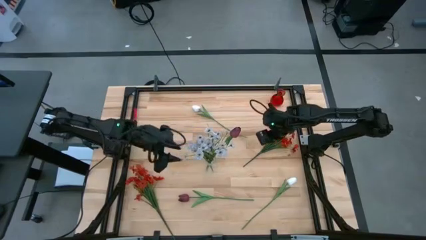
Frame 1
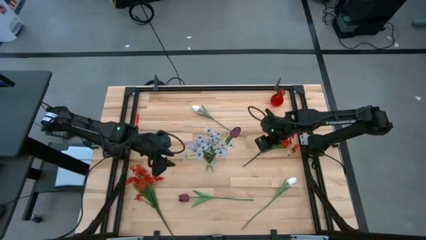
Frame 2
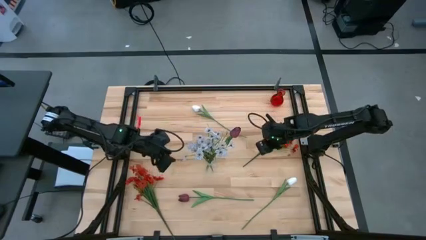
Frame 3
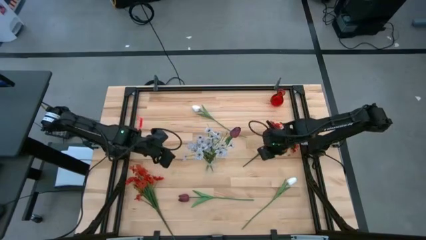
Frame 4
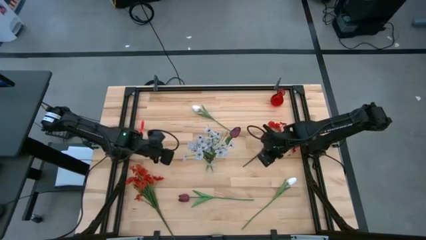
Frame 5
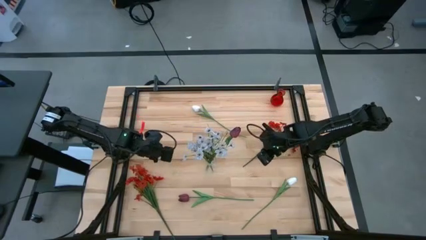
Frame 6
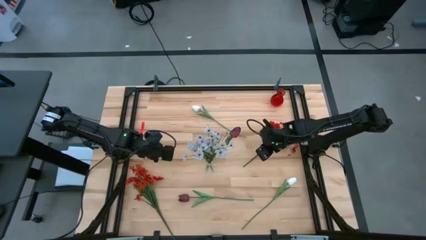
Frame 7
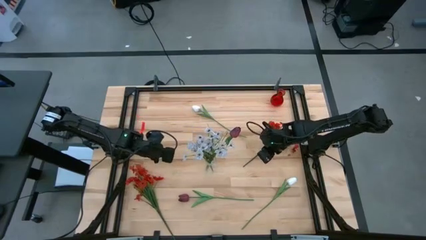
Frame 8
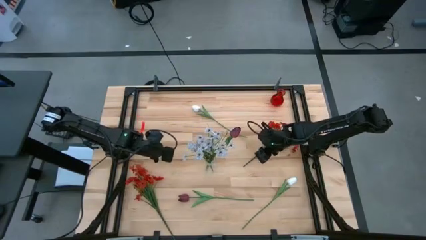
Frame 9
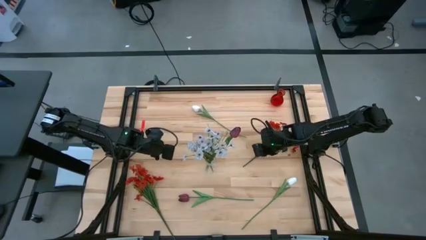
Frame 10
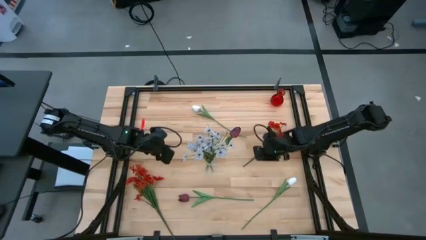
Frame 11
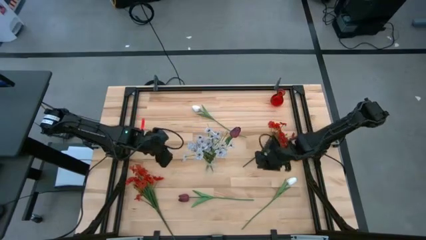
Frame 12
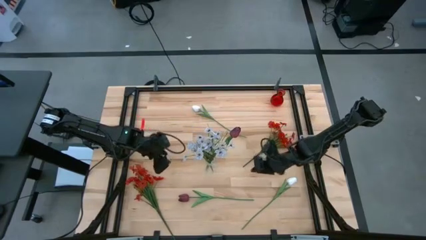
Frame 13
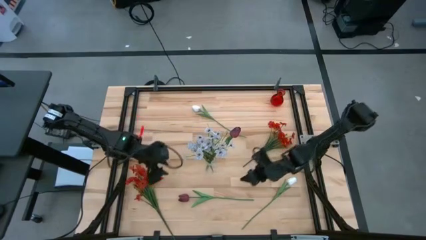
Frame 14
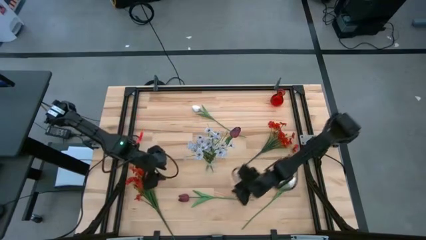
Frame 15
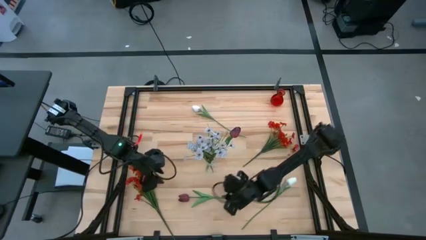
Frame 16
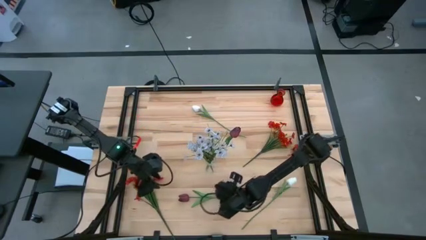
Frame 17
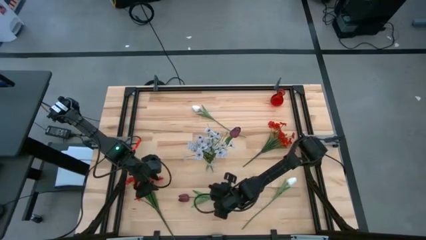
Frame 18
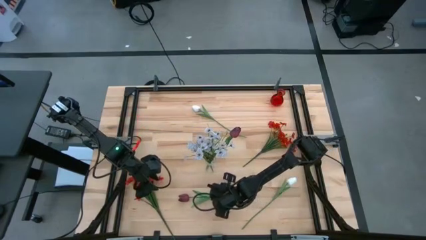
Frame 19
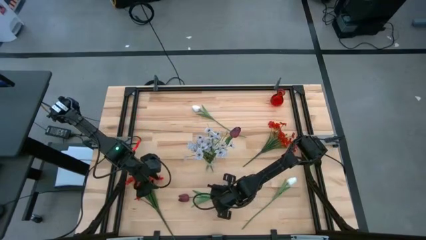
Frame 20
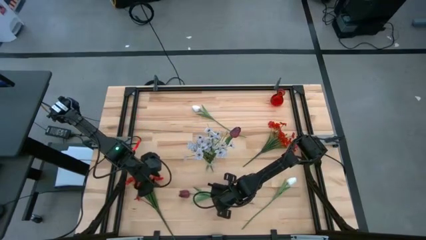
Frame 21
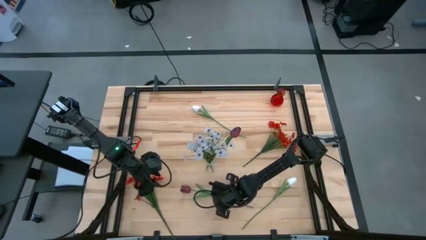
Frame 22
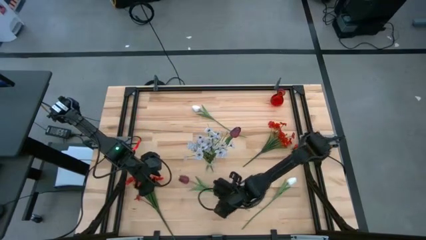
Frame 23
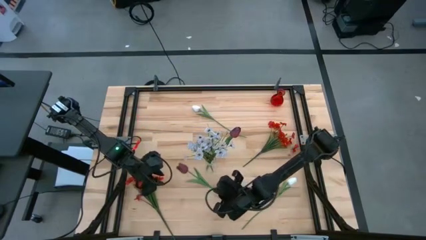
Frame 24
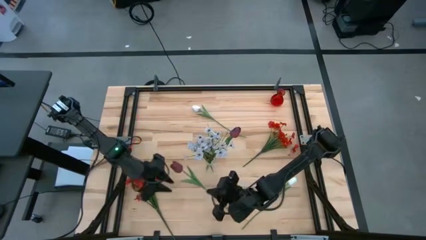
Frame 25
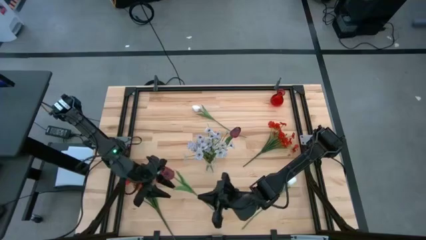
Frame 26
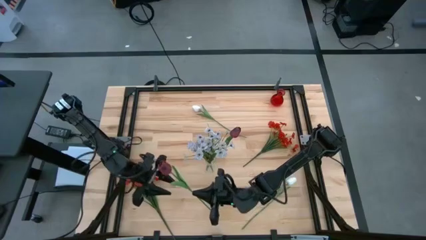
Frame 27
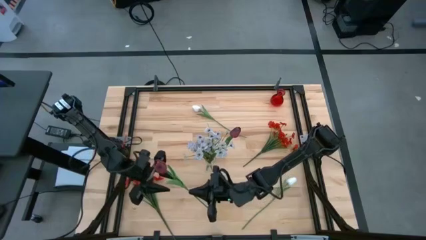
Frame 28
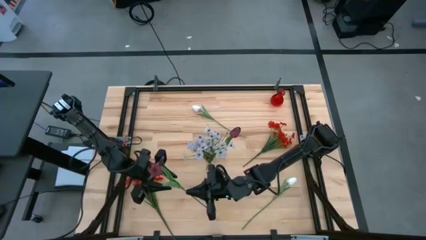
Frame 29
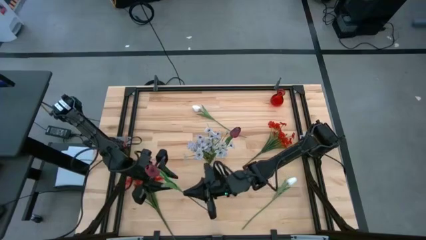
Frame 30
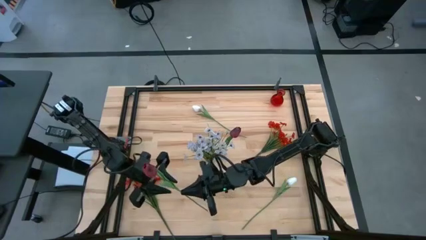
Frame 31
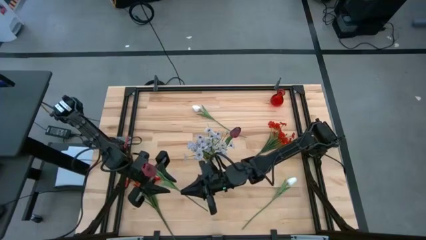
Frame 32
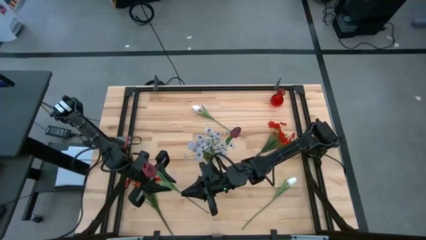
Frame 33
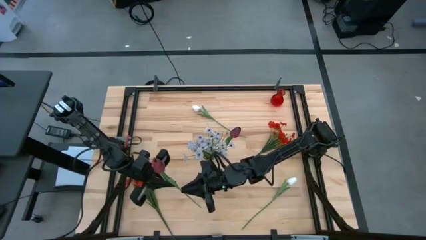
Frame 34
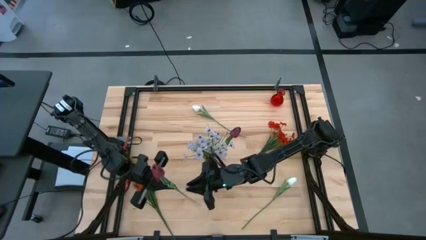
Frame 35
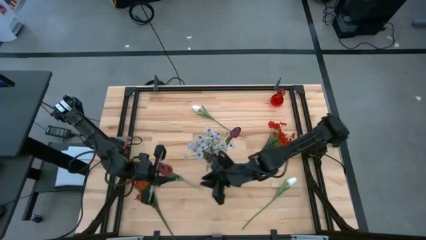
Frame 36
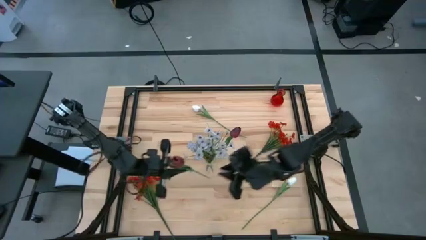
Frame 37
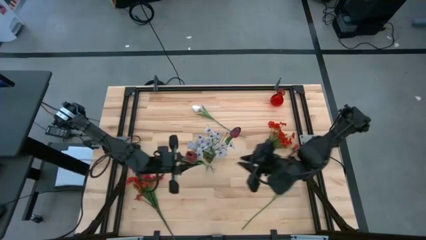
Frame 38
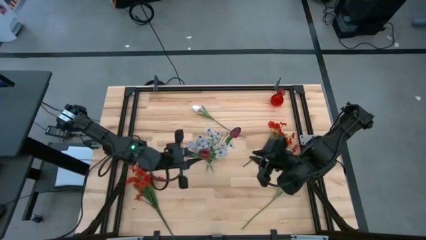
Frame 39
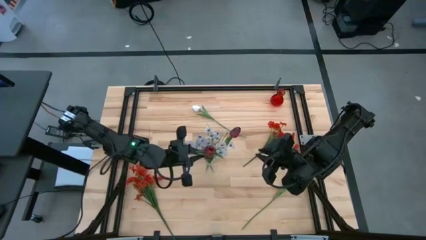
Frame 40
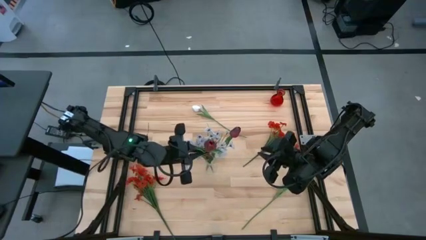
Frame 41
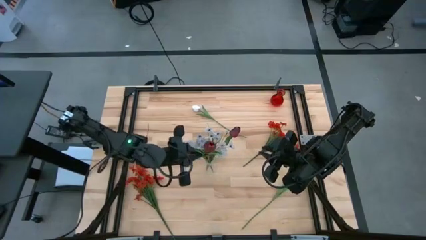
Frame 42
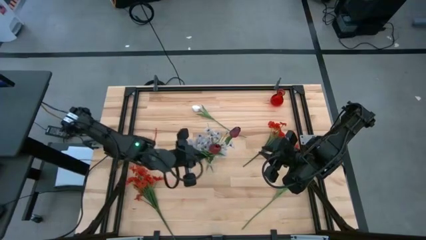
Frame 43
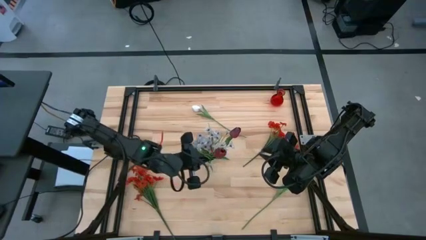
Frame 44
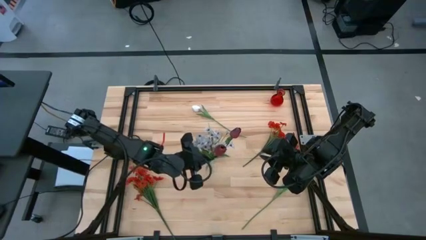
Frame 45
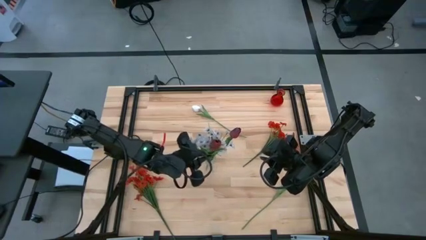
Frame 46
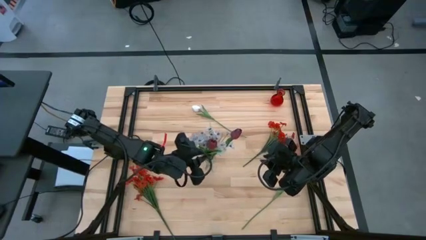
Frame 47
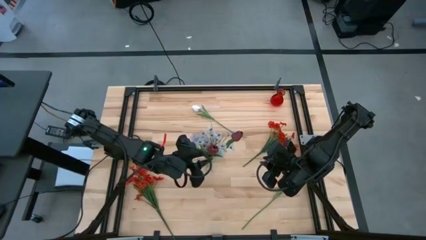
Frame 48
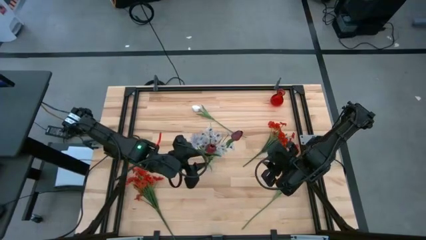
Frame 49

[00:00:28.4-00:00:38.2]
Task: Sort flowers into vase by color
Put the dark red tulip into the transparent vase

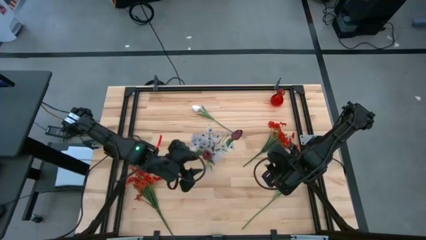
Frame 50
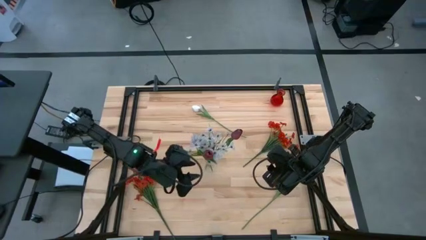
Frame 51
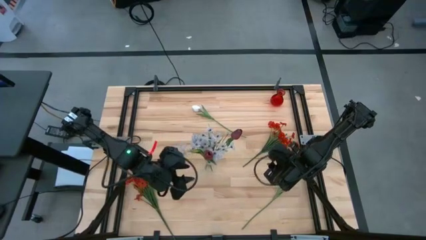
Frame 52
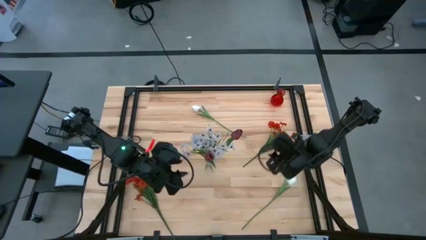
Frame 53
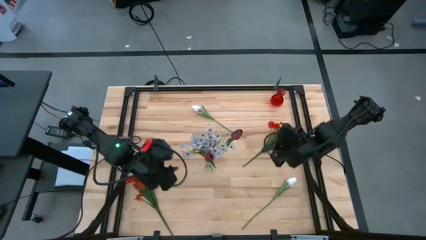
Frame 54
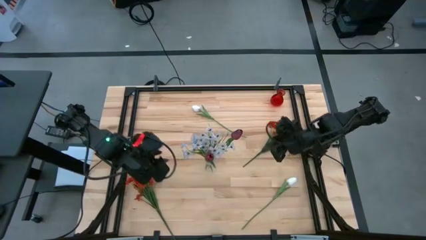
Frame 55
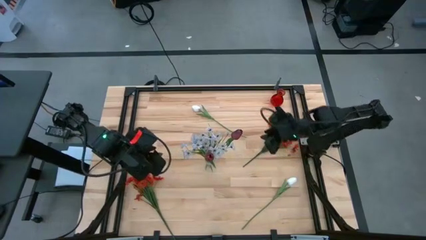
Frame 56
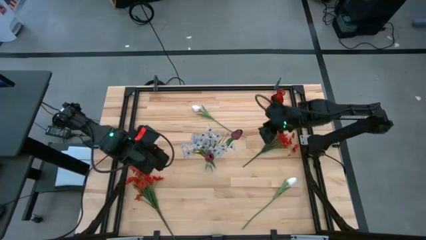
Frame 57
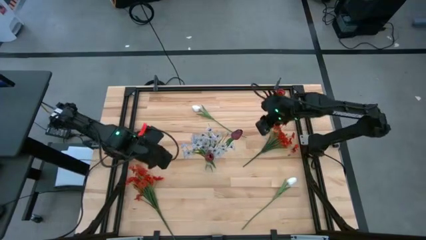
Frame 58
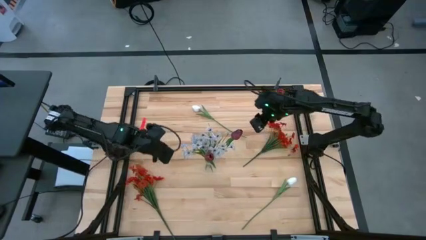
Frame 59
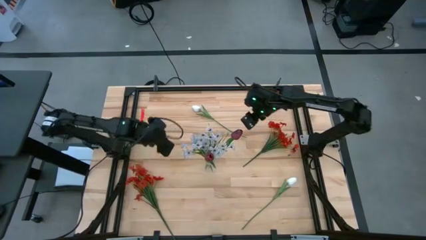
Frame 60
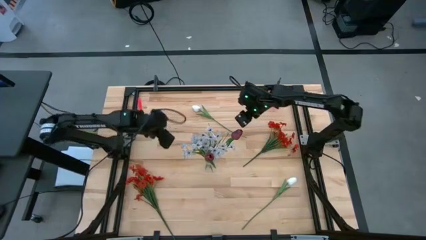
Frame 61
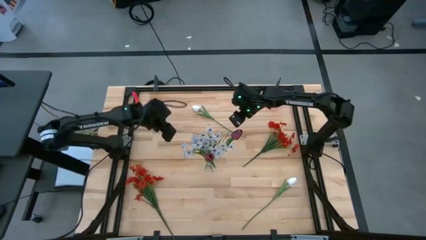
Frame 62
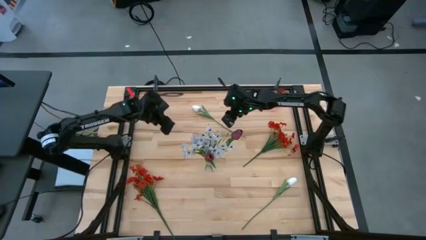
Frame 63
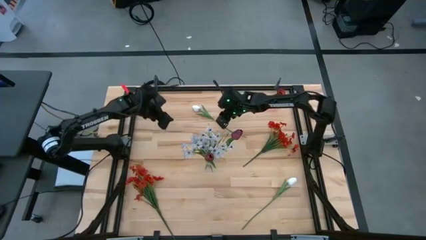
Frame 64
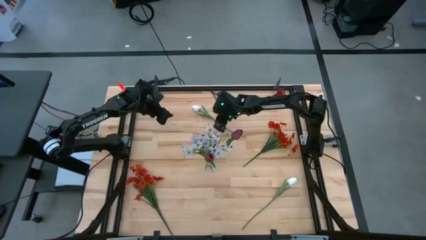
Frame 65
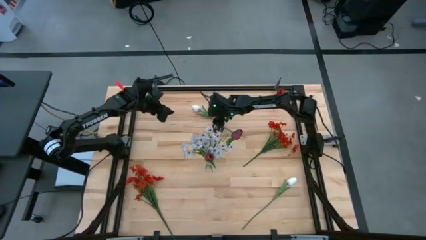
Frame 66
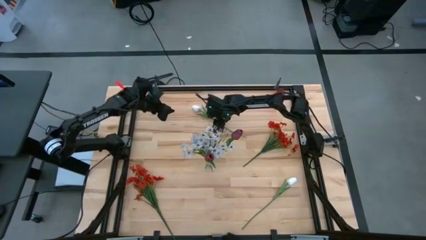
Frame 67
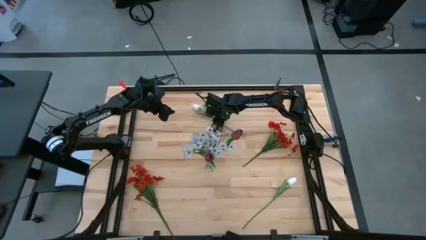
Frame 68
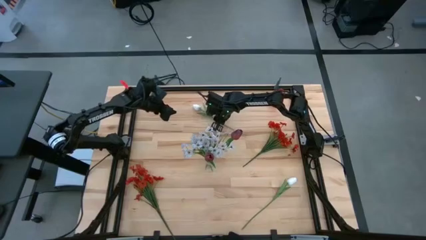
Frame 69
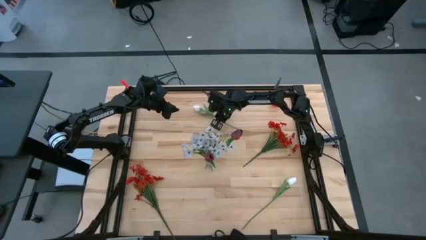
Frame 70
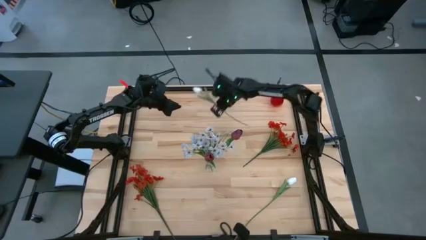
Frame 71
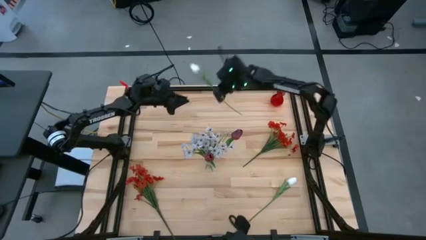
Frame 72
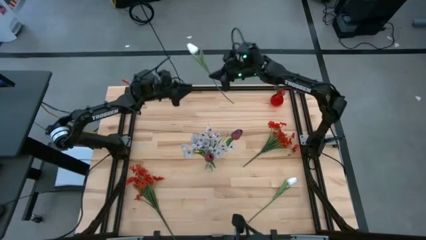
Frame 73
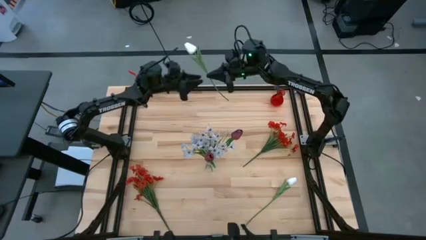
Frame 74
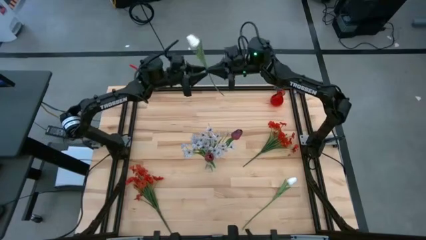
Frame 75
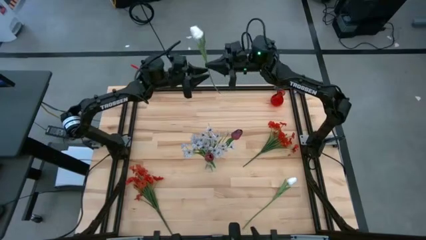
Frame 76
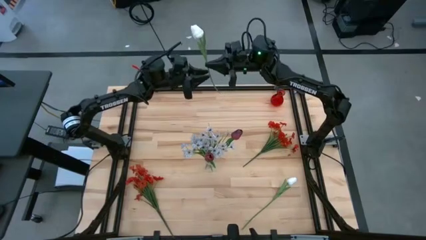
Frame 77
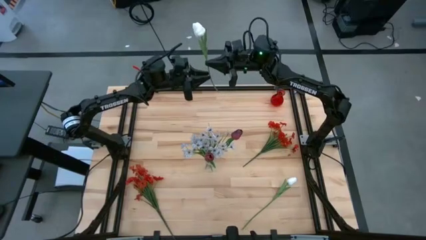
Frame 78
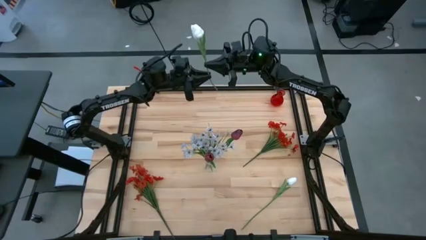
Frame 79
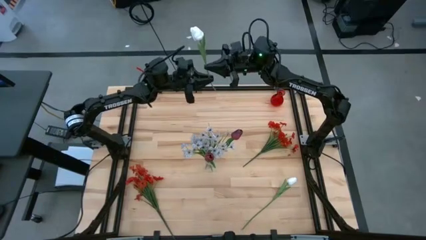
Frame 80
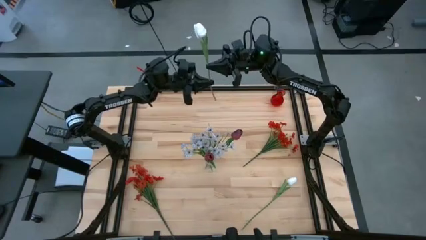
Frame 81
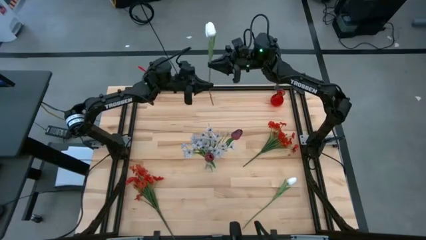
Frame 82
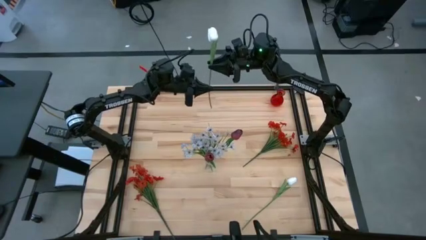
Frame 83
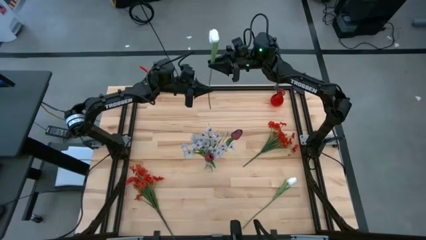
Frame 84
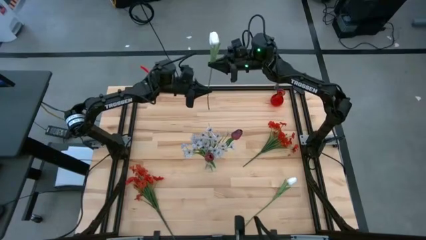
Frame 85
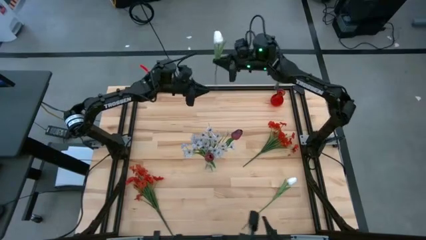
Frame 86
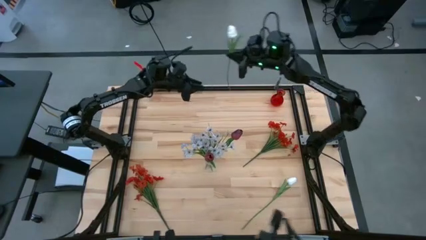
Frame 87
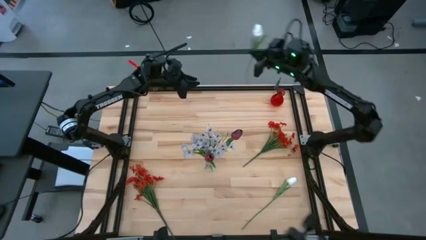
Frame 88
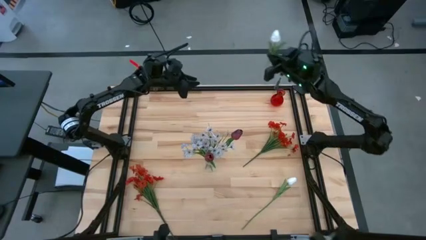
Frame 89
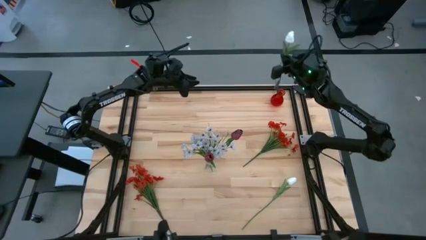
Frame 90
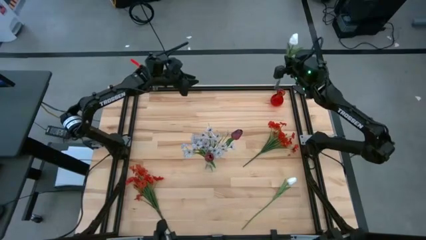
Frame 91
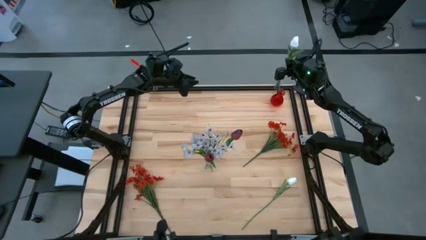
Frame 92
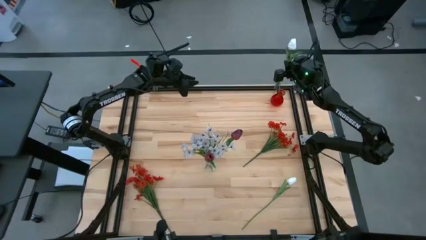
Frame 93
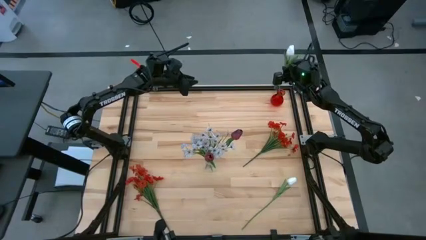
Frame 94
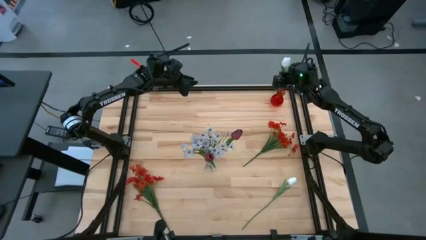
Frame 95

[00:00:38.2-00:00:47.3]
Put the top white tulip into the red vase
